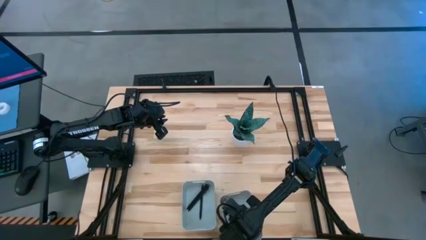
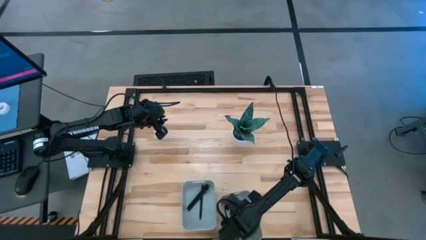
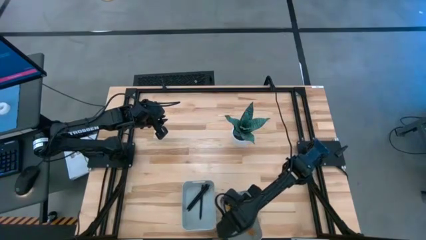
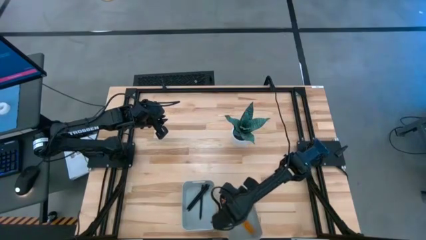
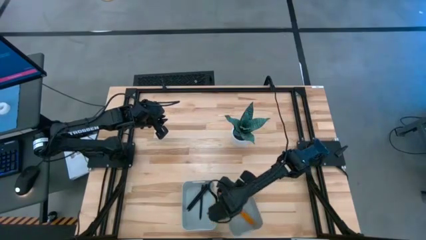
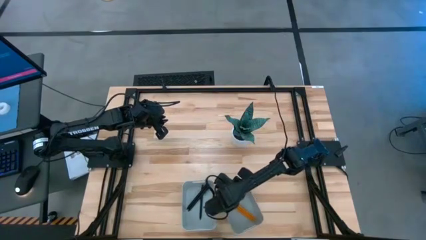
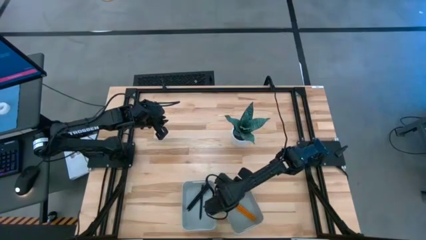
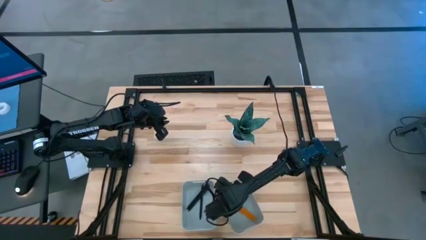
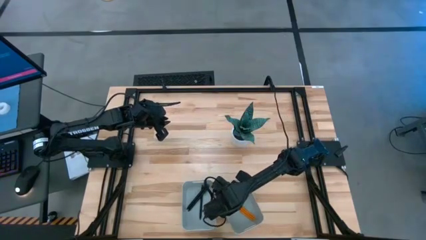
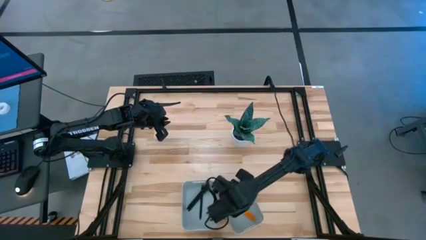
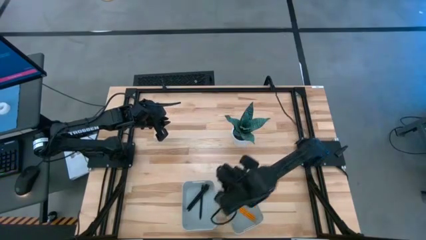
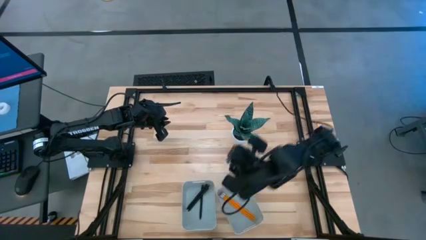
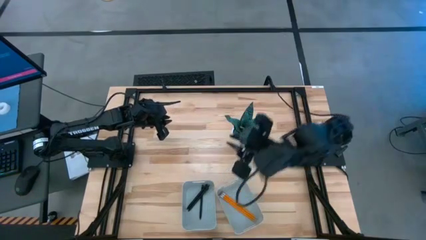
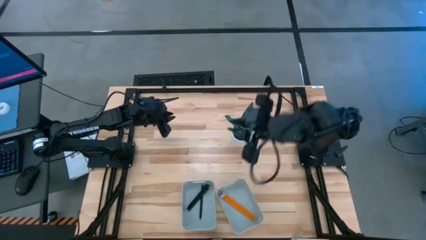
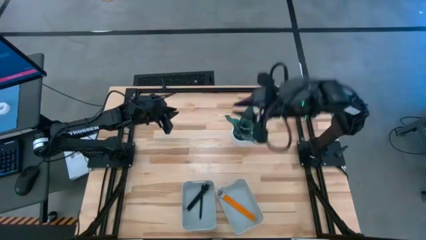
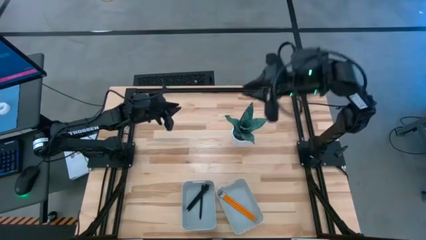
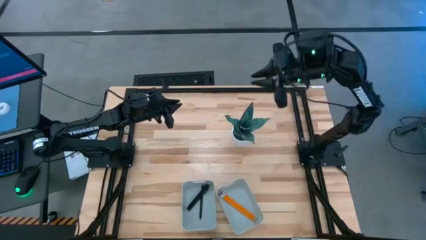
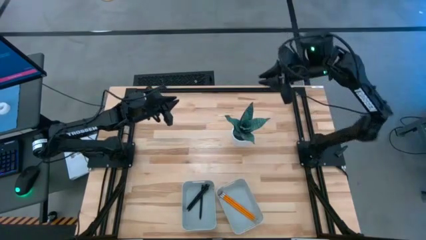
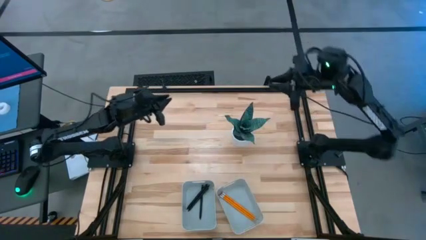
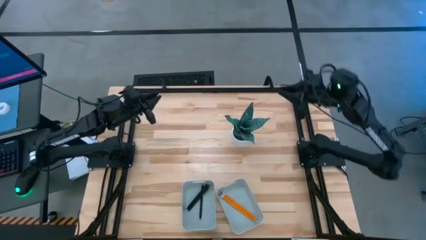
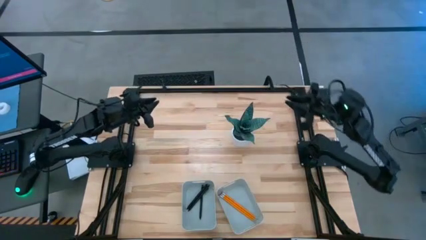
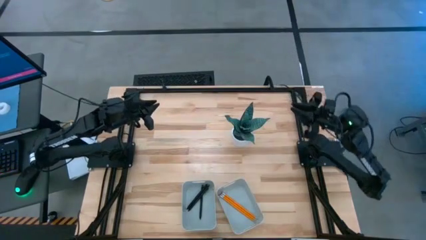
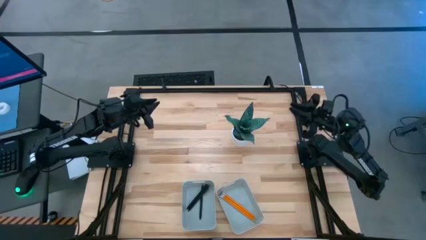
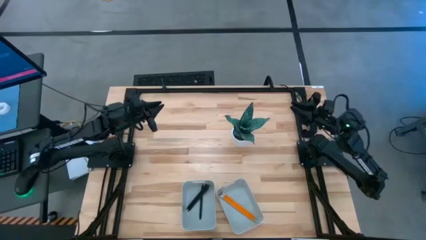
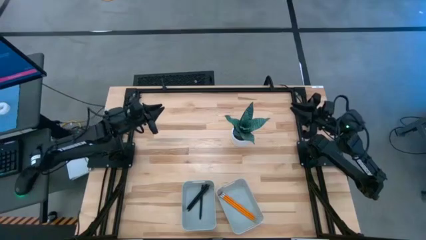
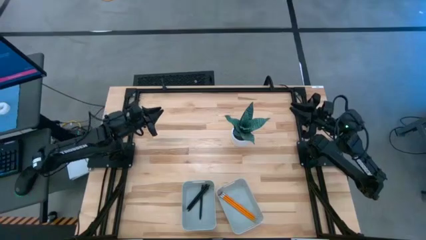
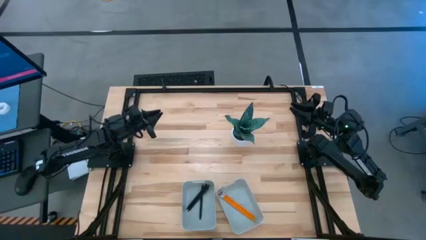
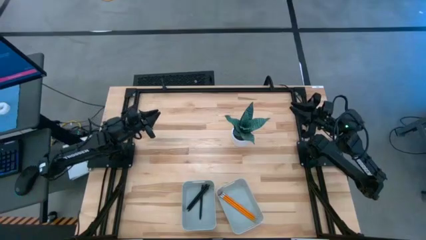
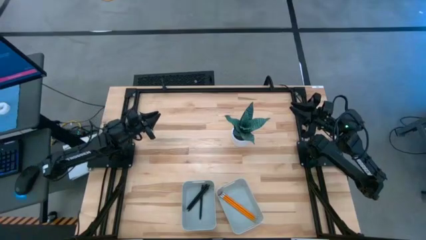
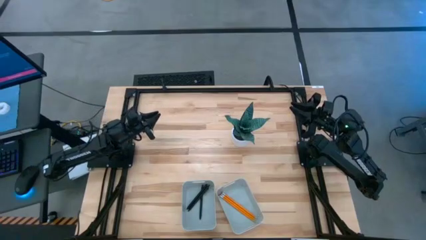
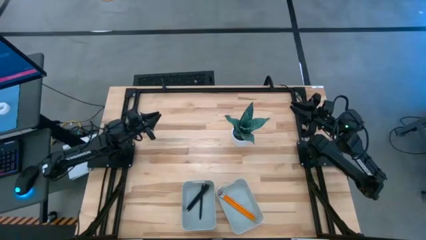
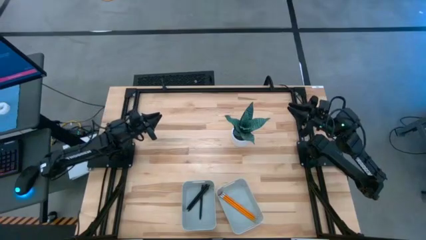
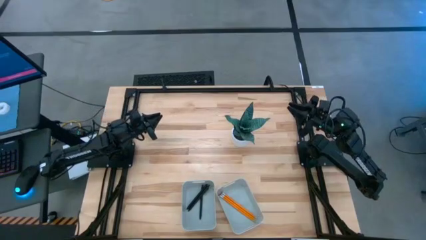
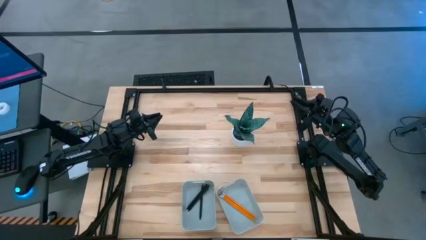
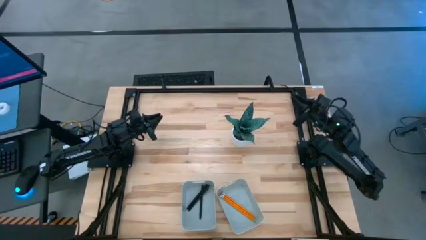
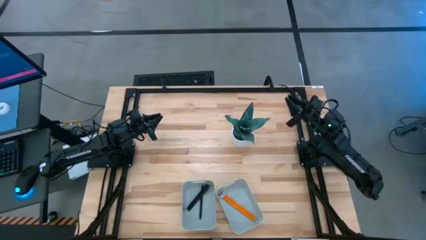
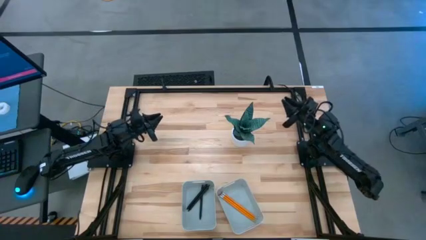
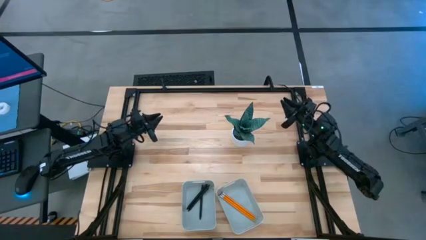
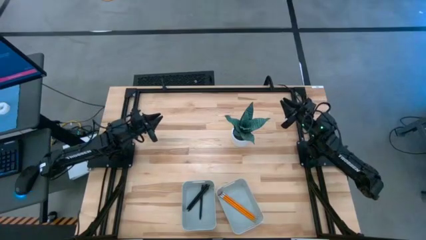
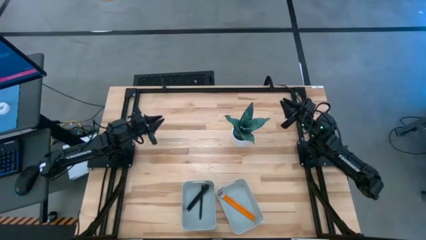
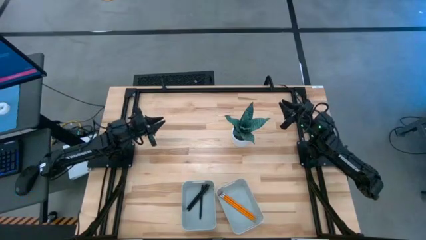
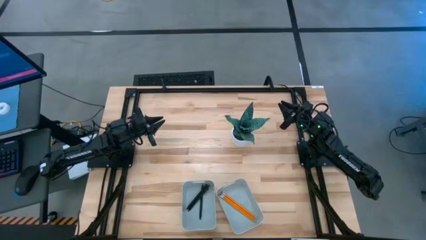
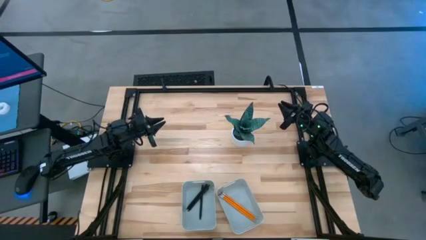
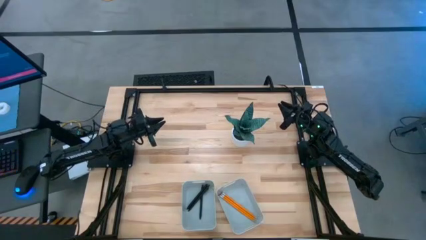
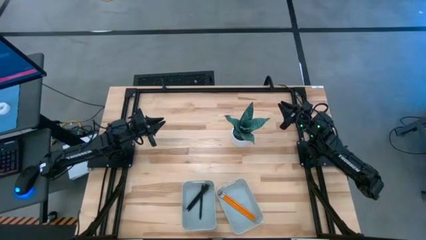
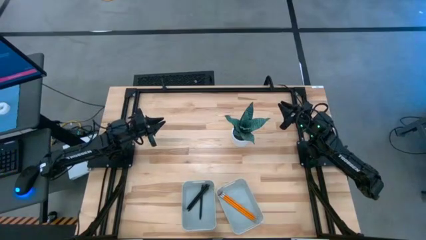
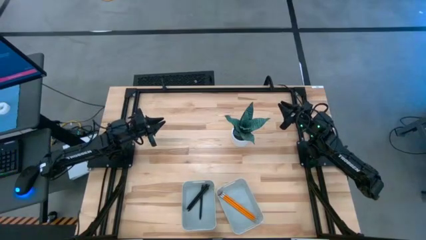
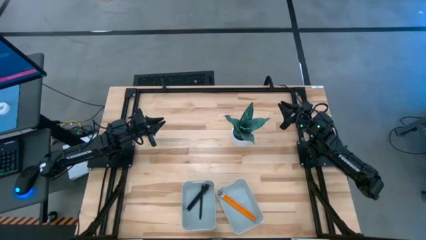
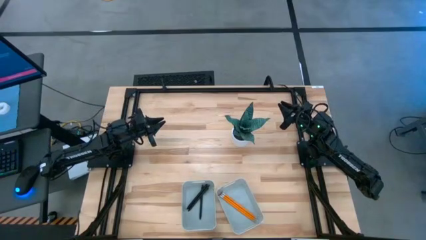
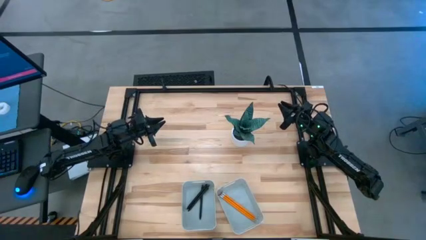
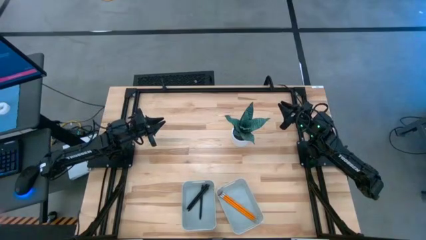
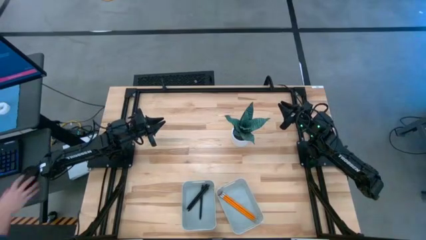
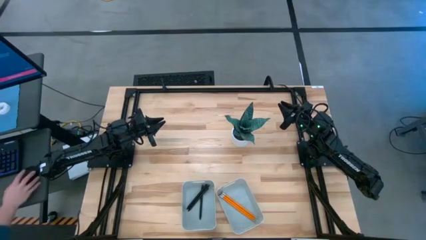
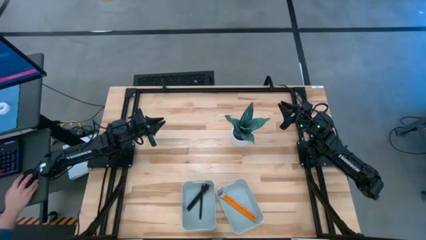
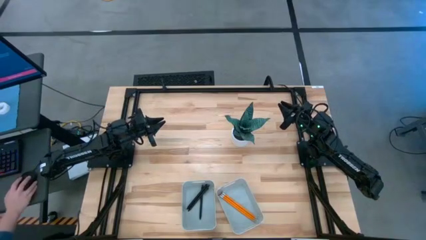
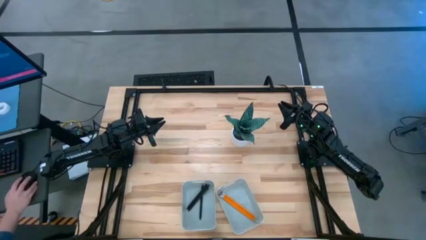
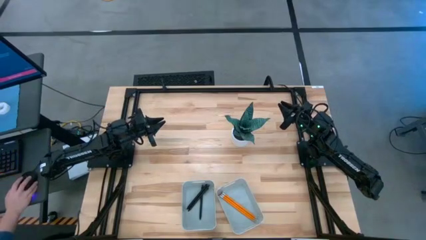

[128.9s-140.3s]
Task: Sort pens & pencils
Return to Home Position

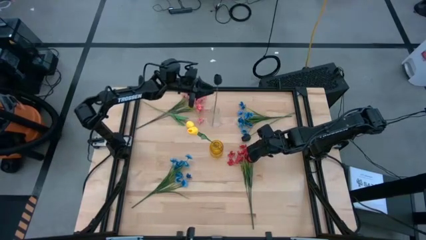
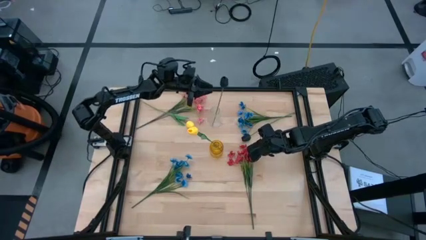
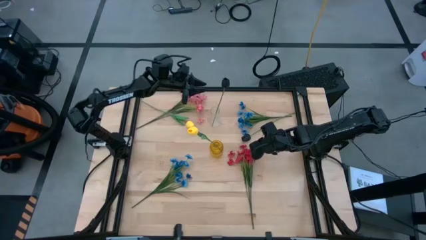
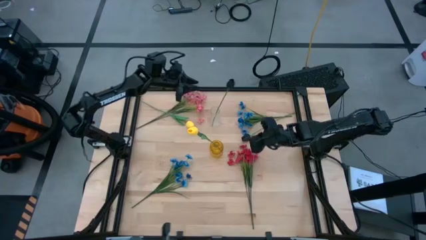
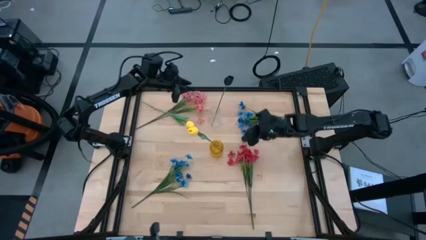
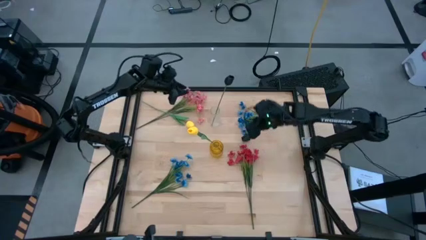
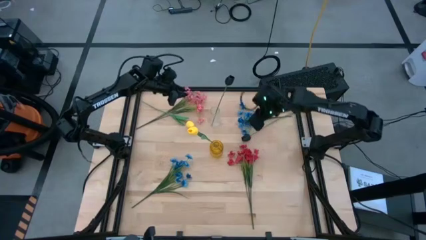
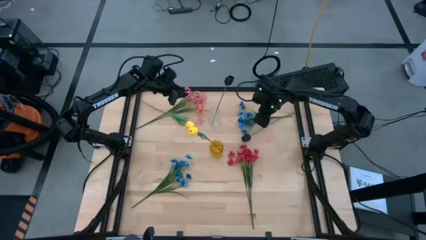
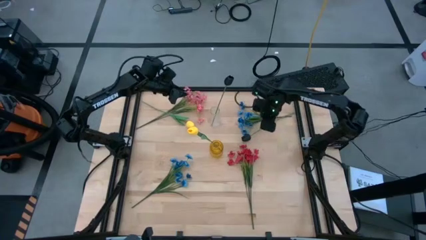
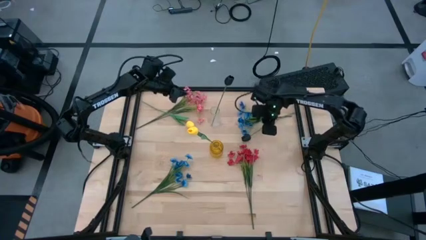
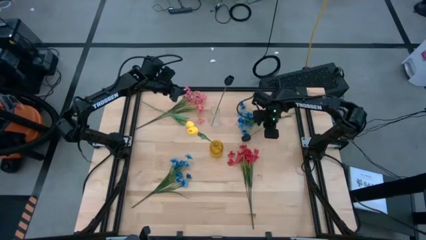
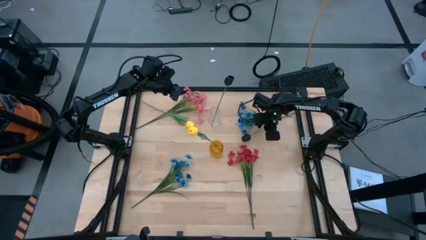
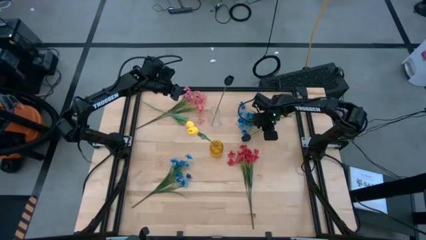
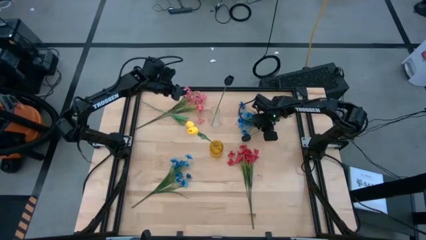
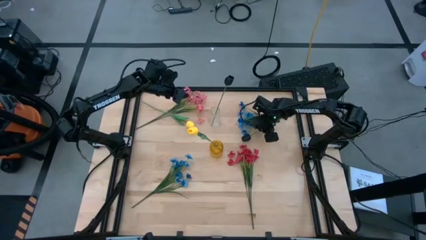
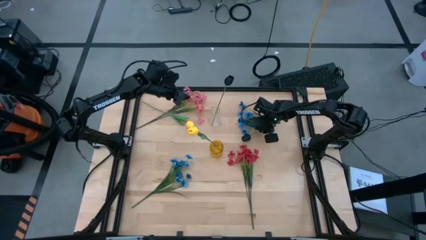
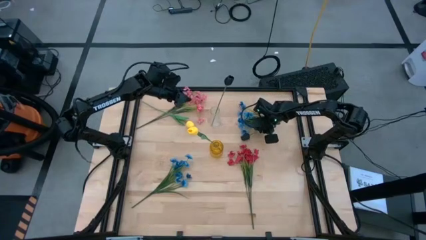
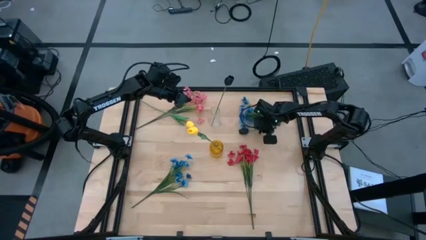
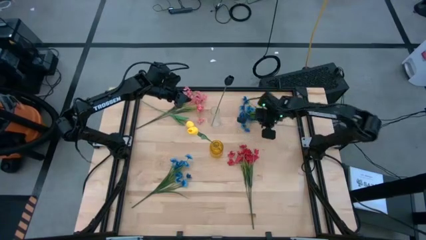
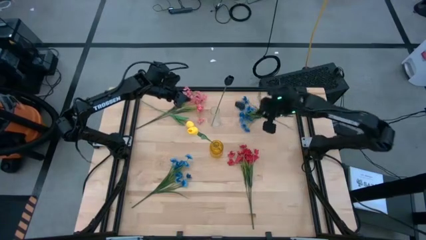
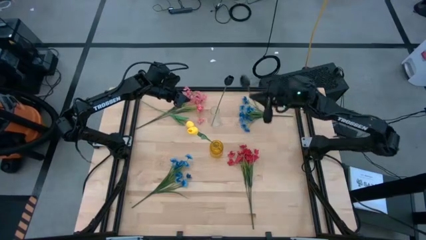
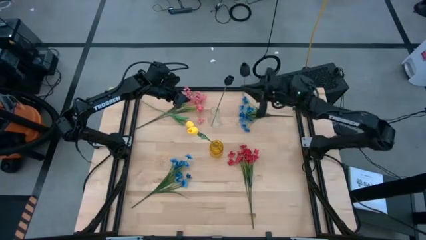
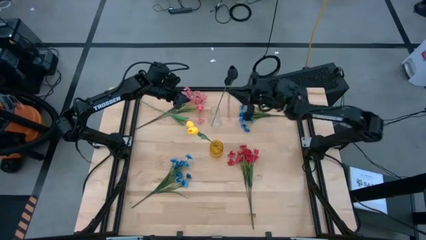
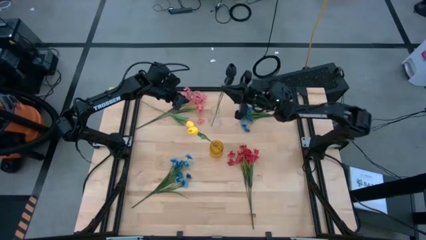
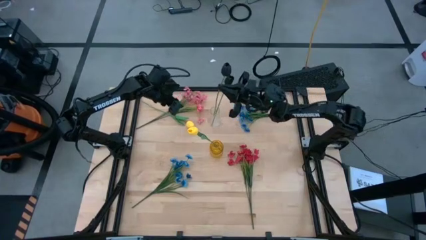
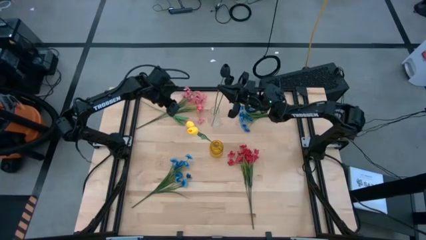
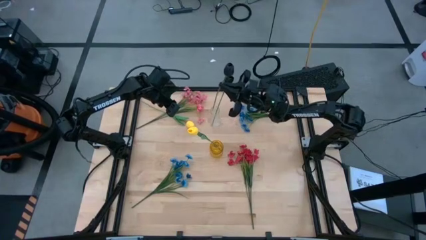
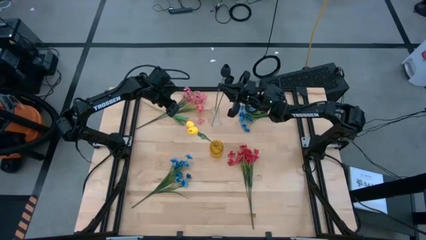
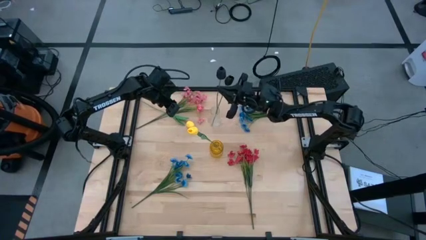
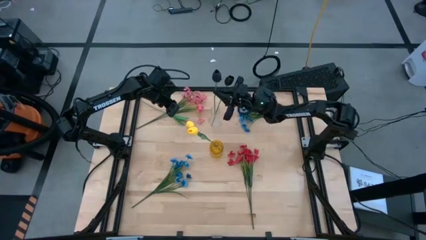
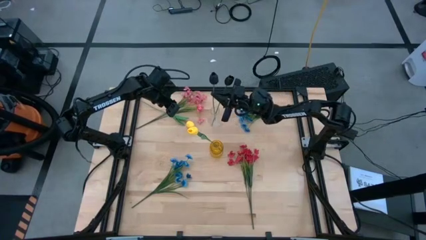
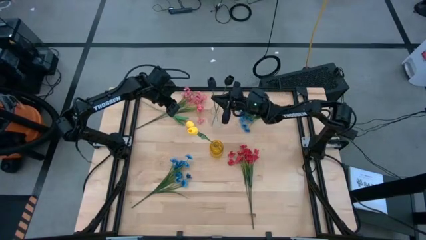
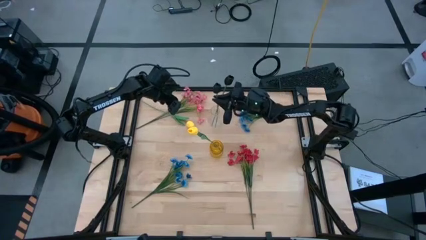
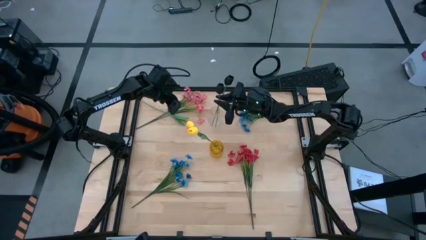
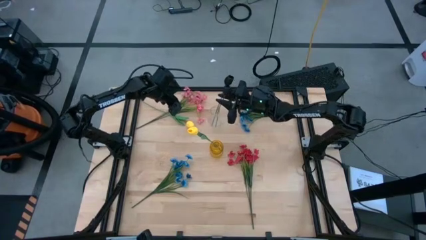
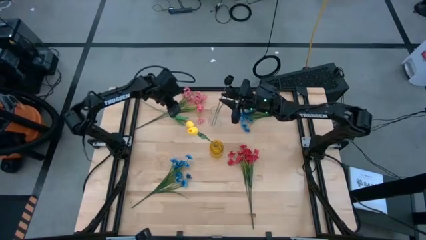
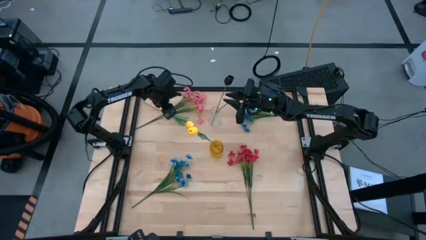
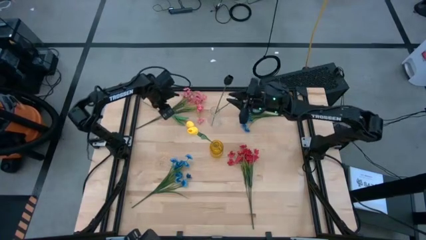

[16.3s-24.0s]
Task: Sort flowers into vase by color
Put the black flower into the transparent flower vase
